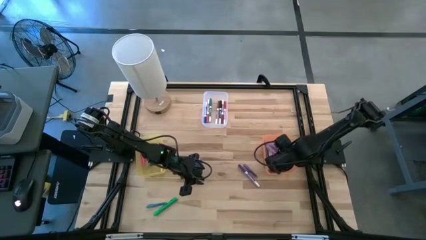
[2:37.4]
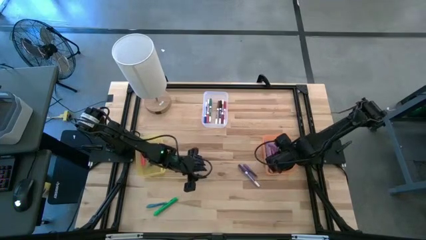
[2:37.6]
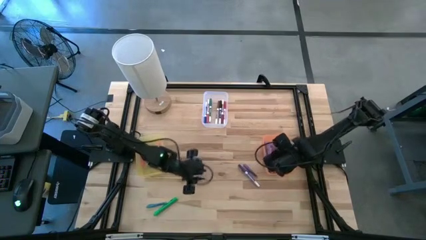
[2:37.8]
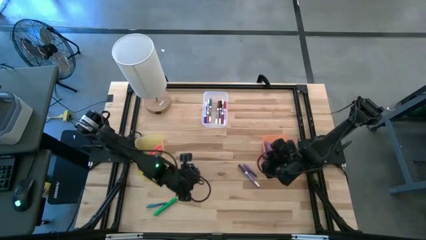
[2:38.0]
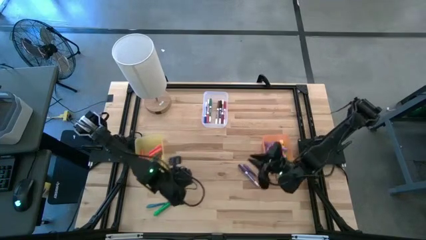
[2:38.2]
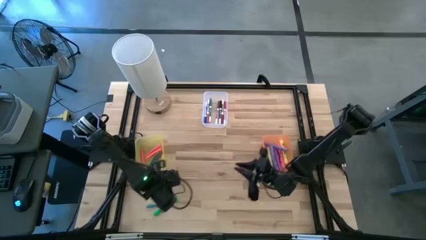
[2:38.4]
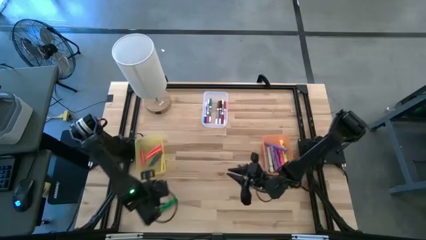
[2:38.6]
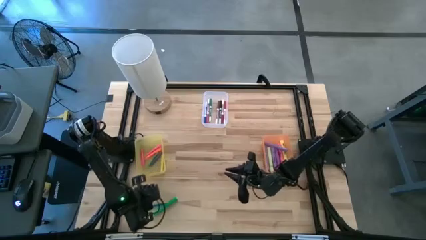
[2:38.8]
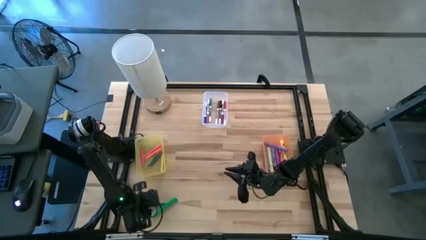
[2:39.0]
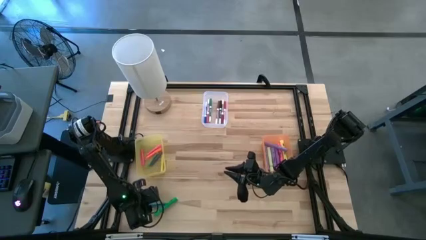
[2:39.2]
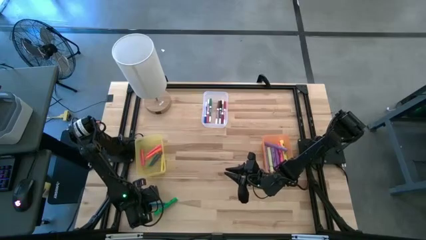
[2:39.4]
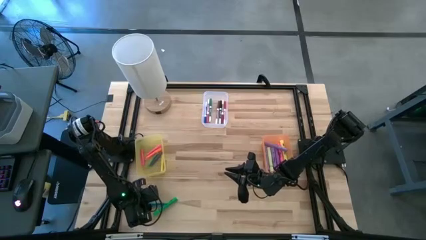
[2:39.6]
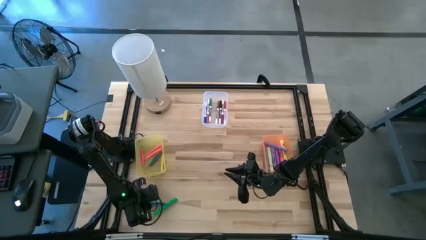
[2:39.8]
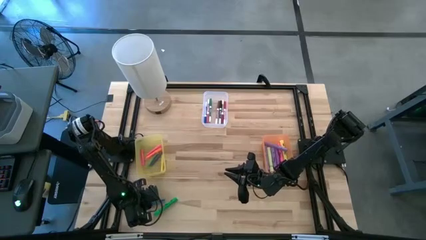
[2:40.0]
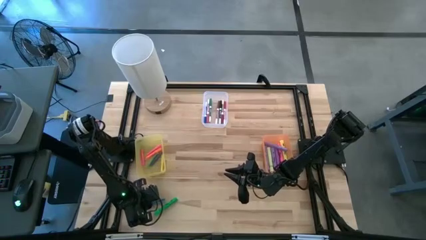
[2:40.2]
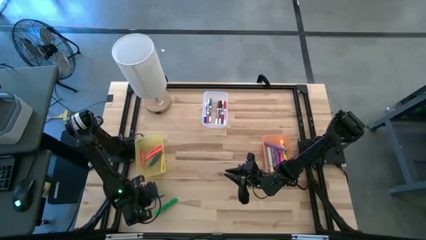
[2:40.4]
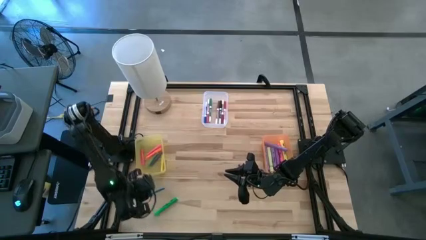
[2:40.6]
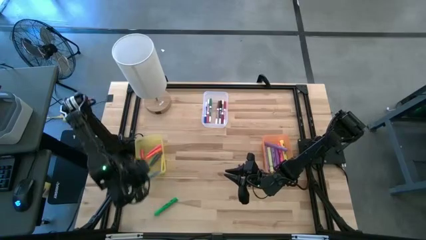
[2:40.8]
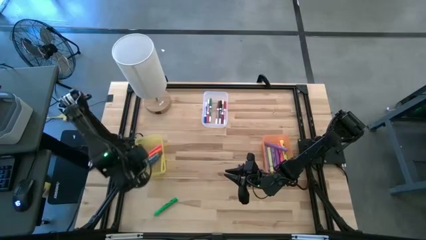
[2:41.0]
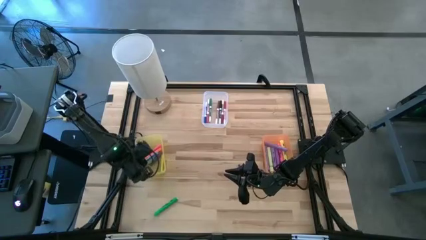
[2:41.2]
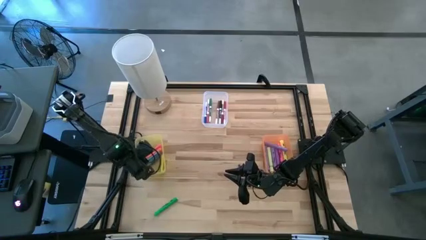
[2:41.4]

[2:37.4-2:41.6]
Task: Pick & Place Markers
Put the blue pen into the yellow bin

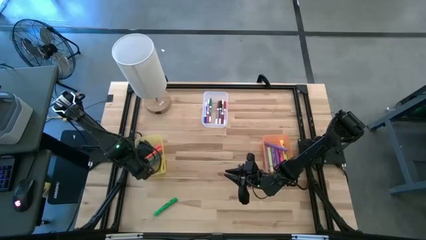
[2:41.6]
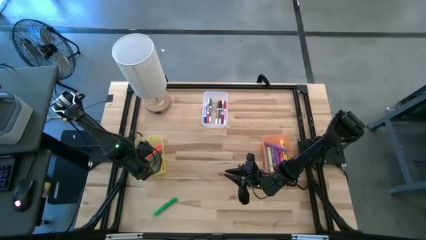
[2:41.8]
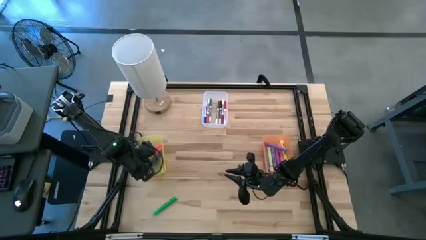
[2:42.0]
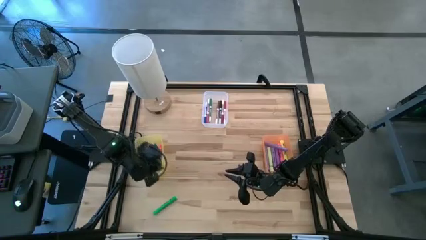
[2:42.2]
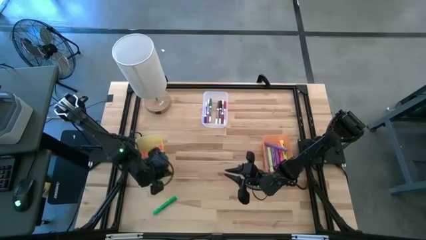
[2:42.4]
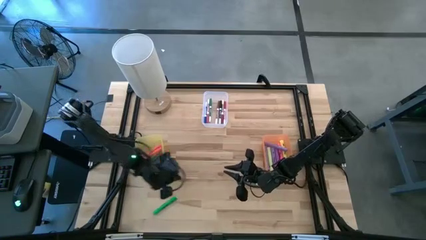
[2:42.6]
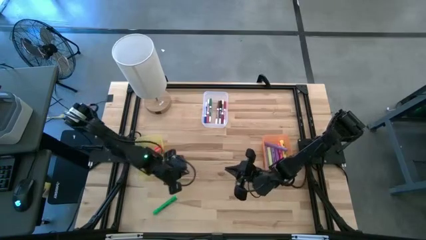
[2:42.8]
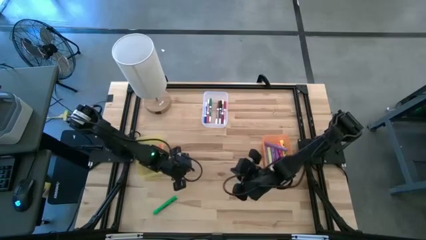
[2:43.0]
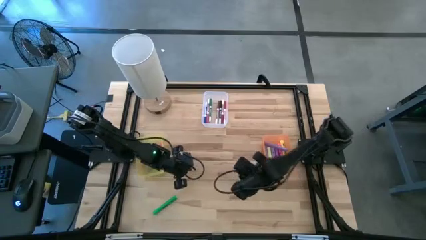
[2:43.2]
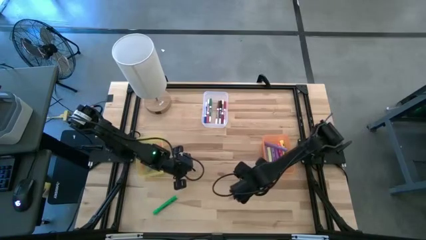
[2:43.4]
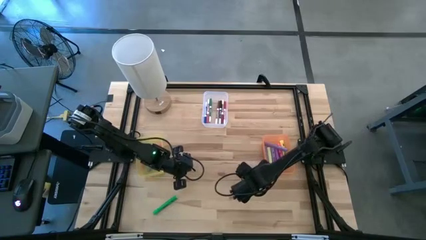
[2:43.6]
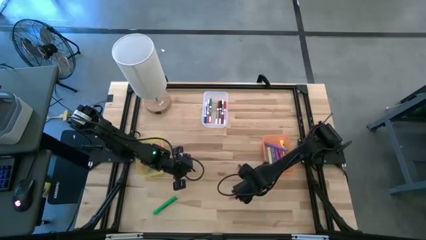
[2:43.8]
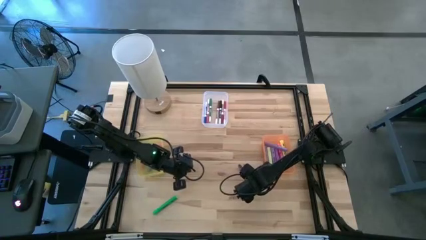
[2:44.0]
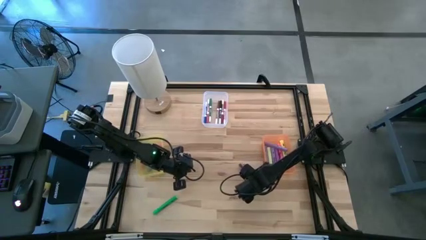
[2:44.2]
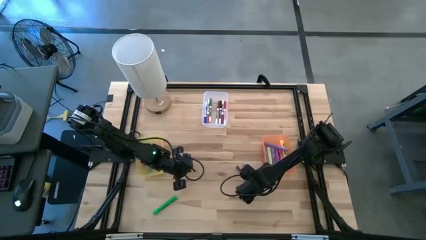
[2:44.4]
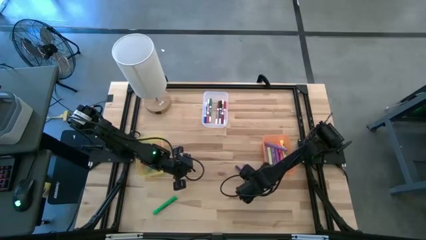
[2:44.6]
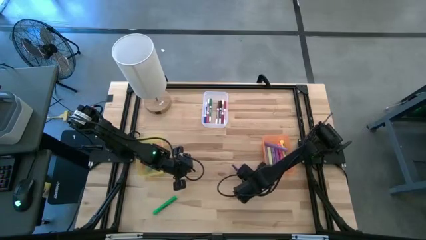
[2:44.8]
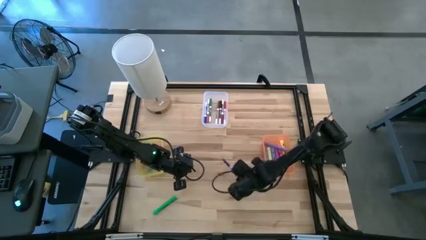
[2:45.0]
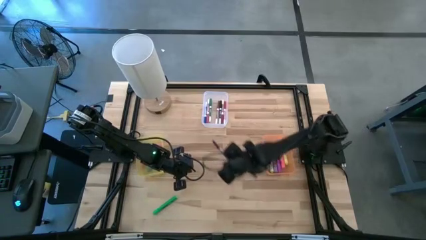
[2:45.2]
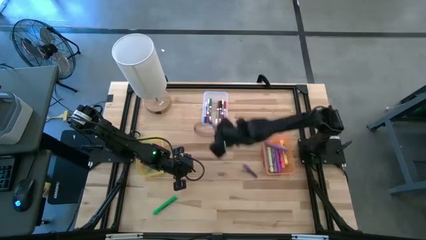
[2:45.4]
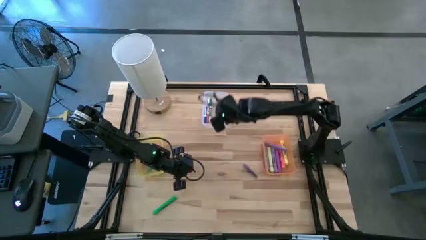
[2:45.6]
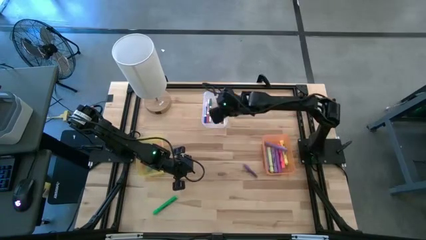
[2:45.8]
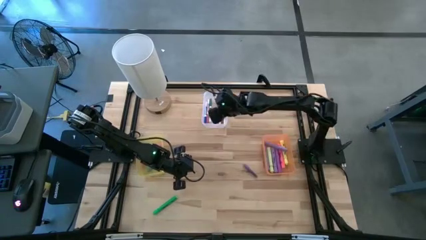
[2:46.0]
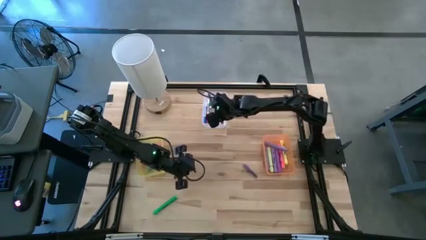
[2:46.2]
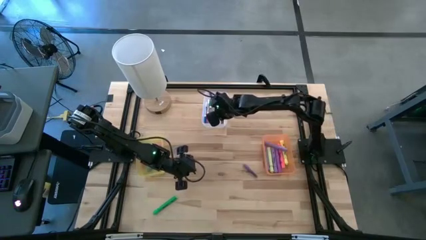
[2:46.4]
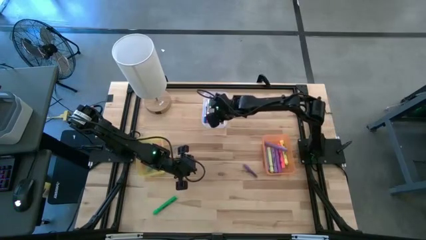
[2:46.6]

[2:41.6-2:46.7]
Put the blue marker pen into the transparent bin

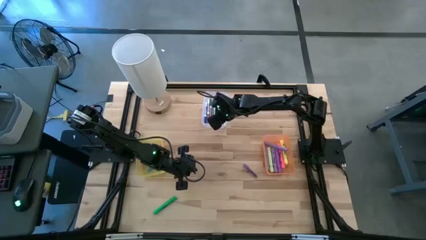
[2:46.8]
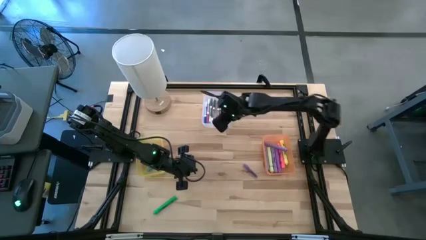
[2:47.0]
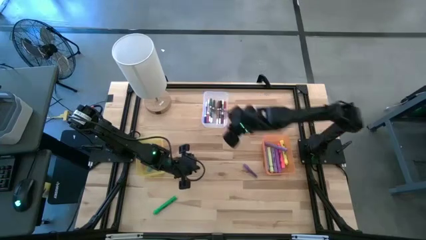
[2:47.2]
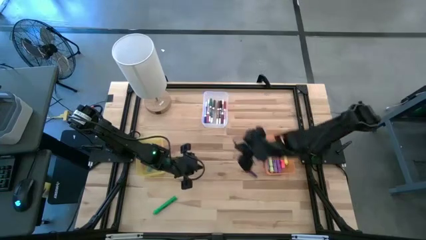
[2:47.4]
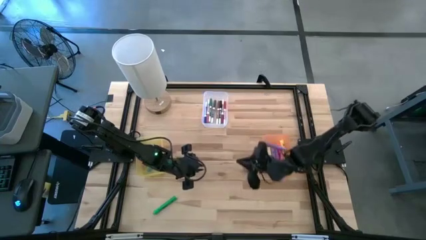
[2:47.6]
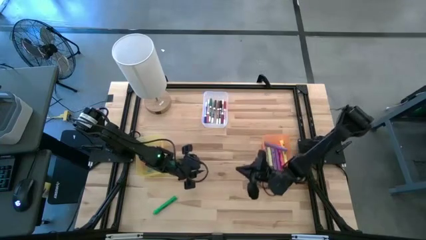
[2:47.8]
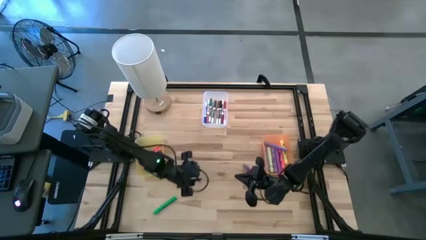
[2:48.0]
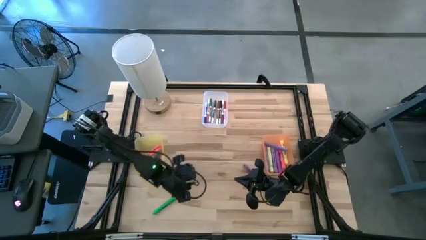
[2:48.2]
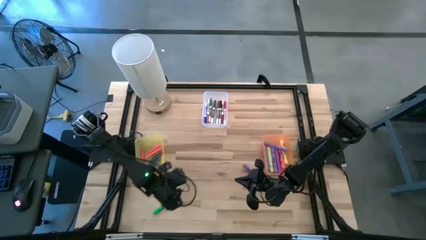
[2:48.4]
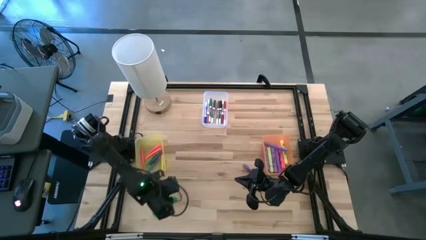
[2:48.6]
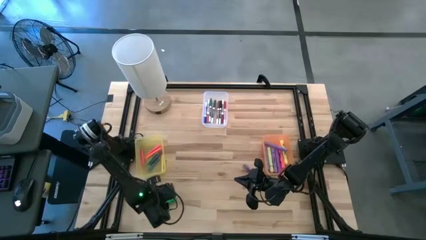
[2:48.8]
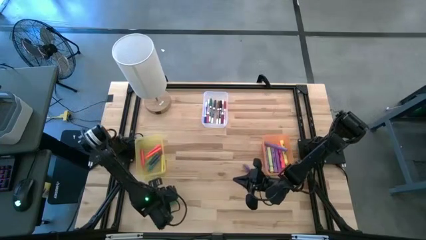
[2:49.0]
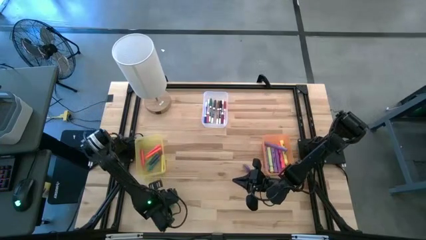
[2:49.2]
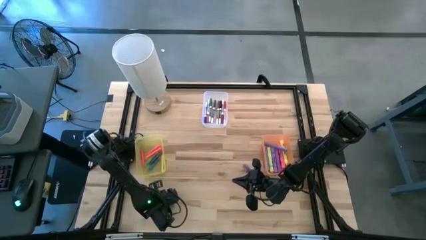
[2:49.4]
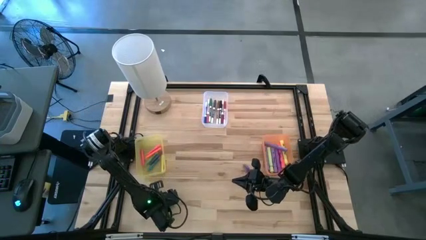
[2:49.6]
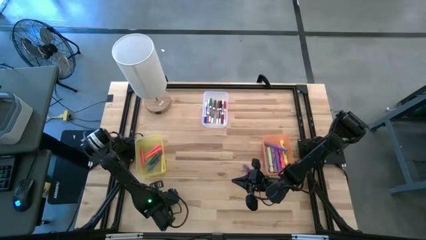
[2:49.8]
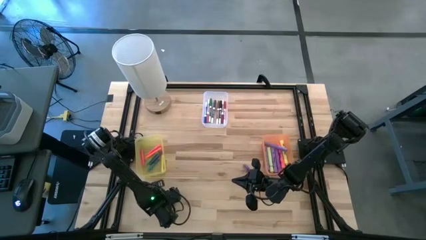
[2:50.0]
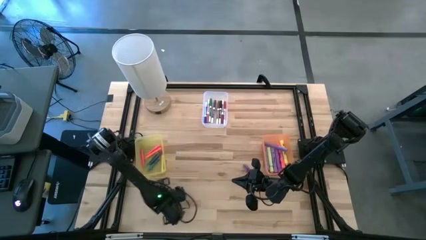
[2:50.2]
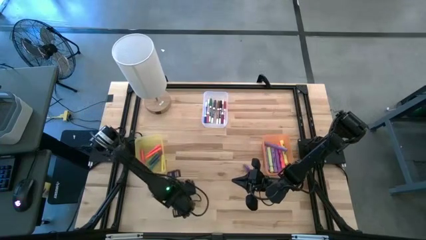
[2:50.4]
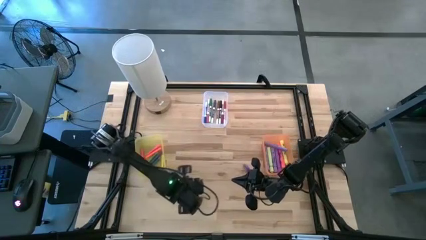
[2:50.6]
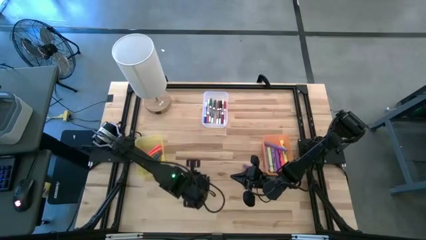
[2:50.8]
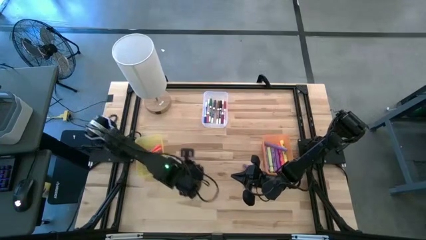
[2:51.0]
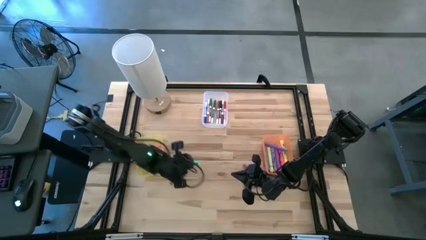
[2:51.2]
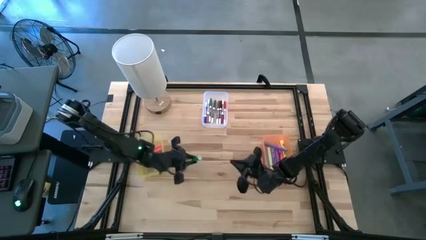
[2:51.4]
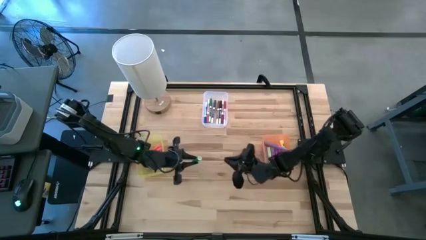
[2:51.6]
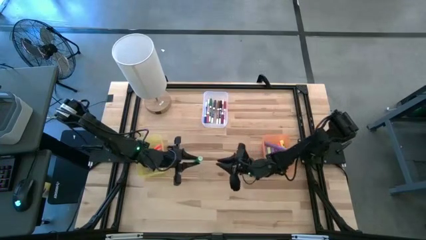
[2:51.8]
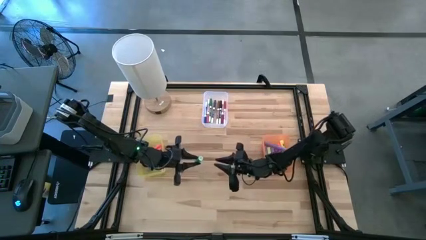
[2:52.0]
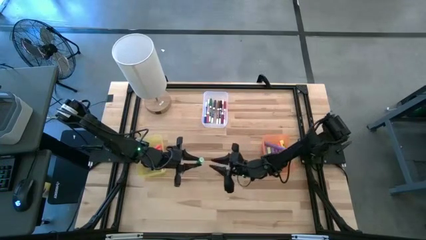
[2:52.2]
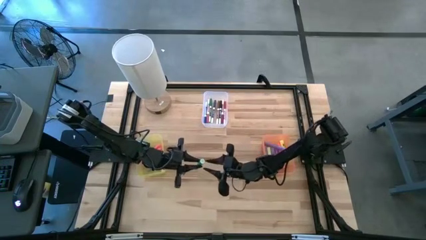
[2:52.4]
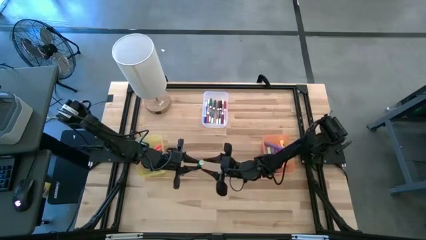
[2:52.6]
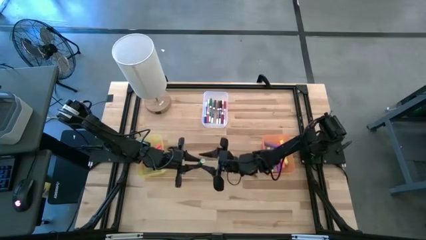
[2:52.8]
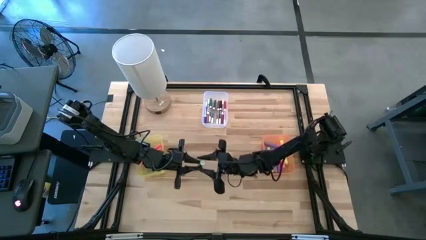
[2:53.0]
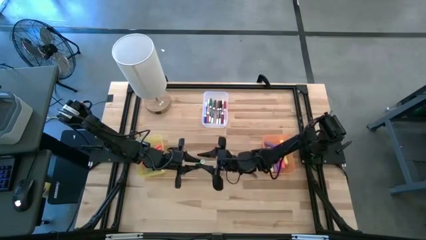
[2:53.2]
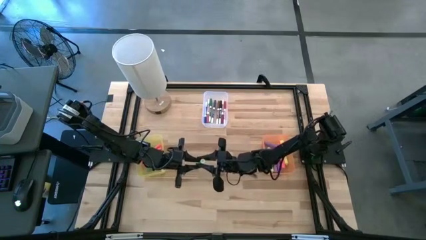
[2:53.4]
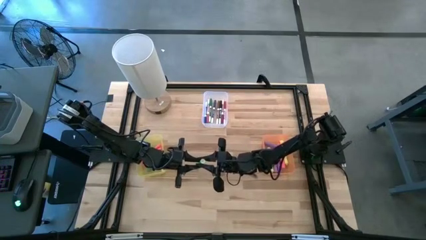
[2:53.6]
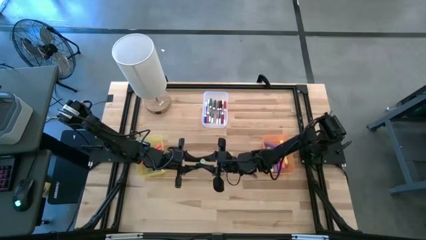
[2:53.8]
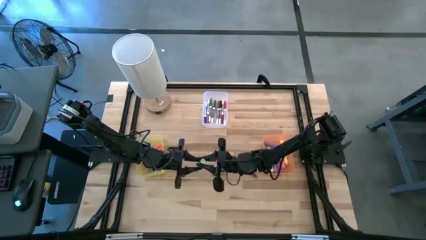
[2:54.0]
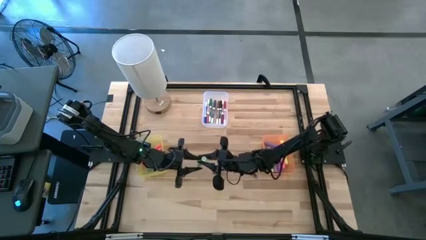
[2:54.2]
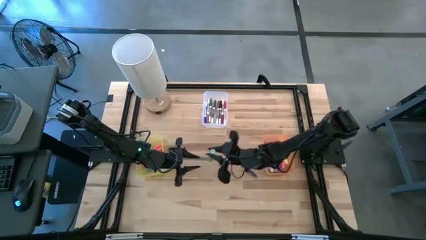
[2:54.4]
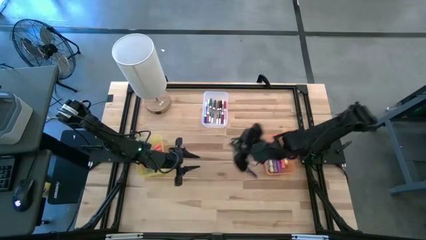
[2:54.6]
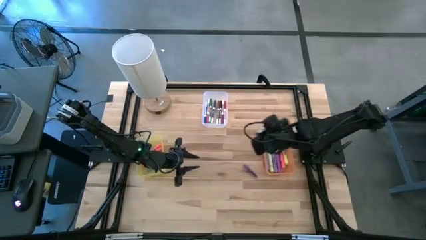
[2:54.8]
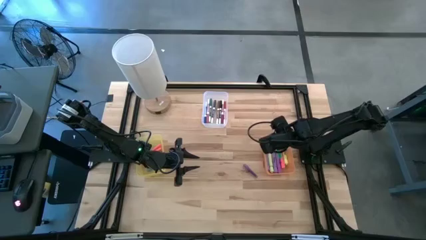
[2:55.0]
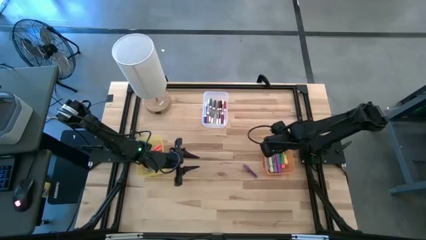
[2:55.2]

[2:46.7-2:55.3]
Put the green highlighter pen into the orange bin
